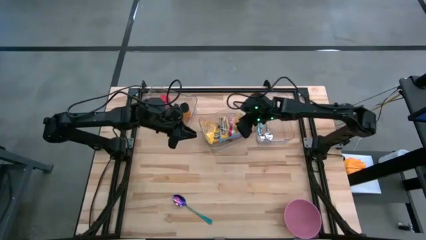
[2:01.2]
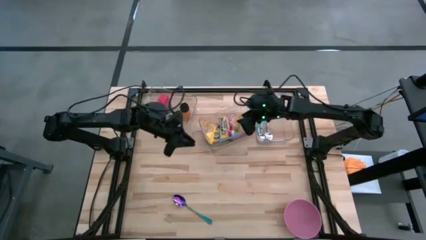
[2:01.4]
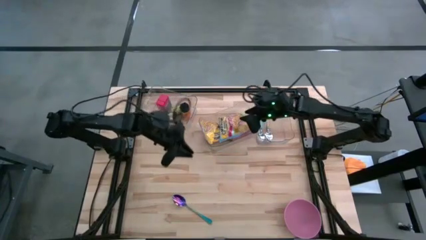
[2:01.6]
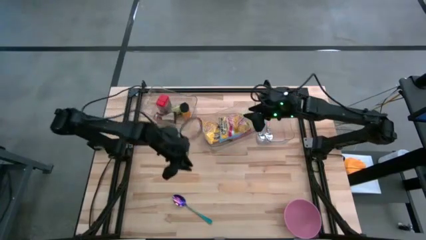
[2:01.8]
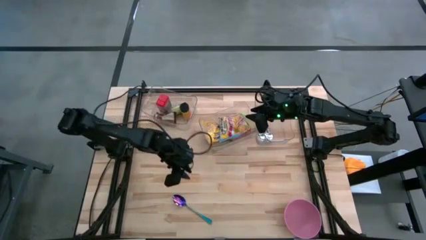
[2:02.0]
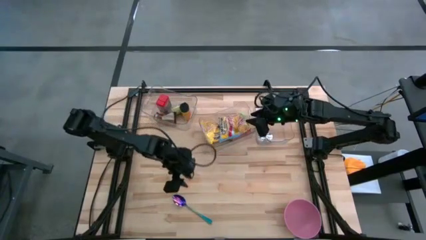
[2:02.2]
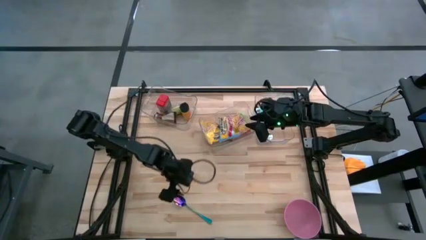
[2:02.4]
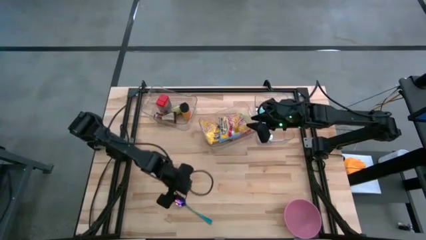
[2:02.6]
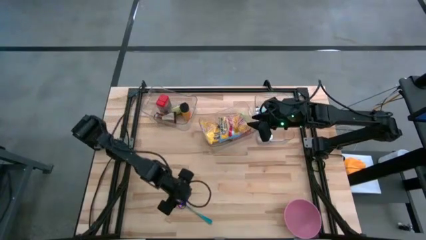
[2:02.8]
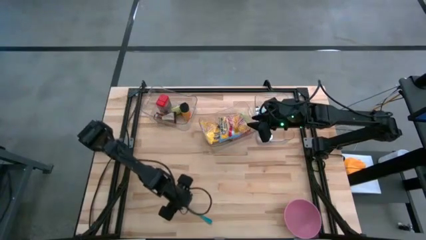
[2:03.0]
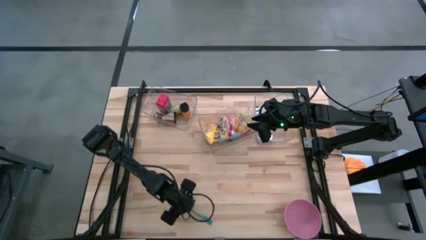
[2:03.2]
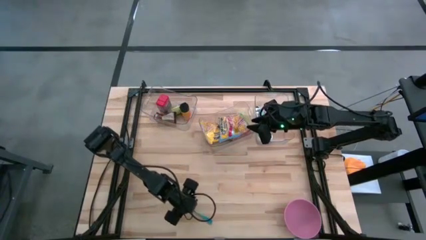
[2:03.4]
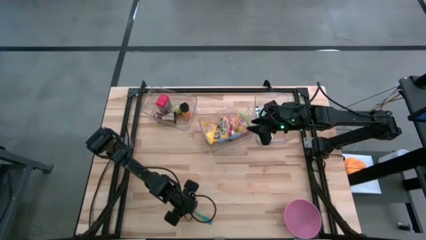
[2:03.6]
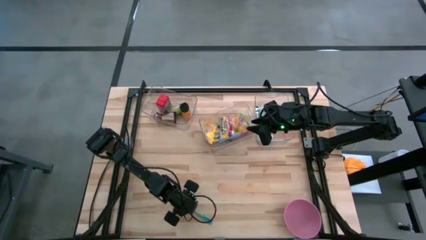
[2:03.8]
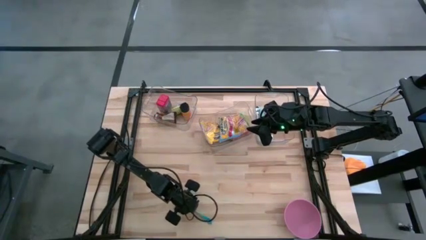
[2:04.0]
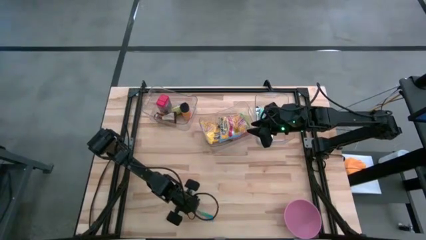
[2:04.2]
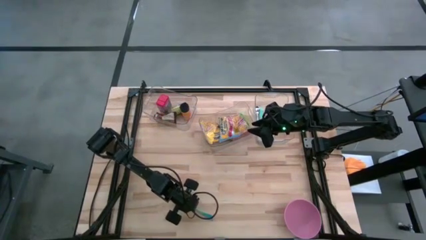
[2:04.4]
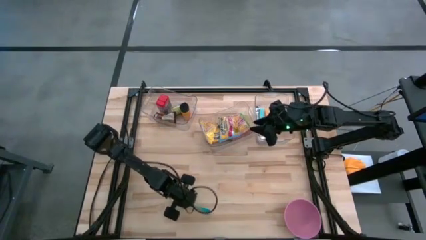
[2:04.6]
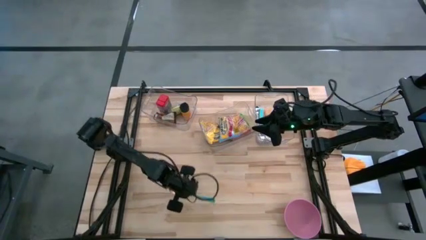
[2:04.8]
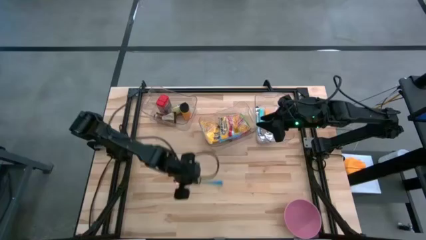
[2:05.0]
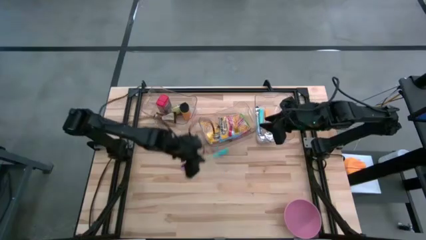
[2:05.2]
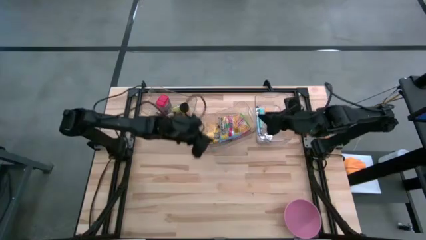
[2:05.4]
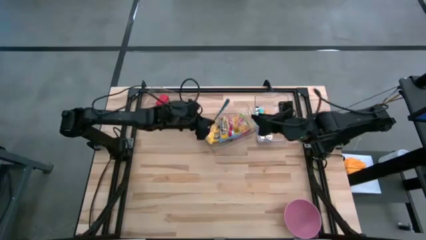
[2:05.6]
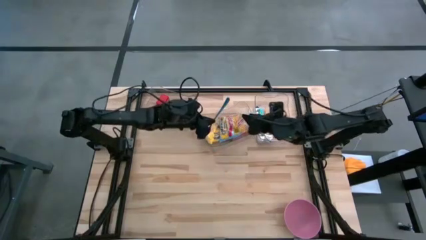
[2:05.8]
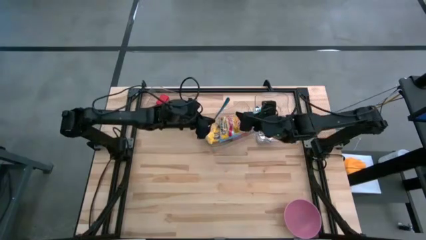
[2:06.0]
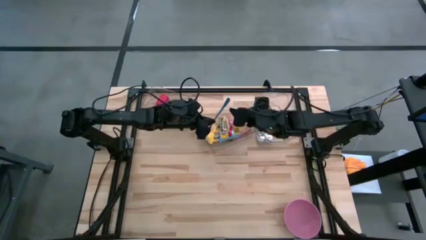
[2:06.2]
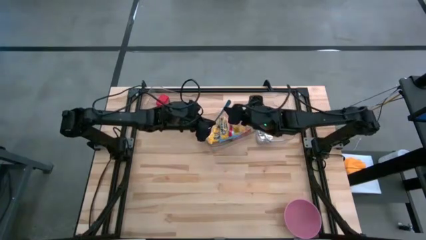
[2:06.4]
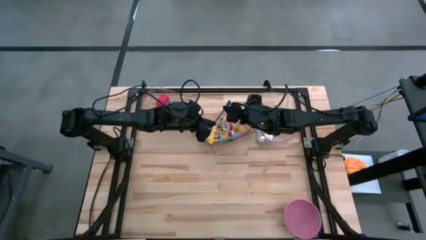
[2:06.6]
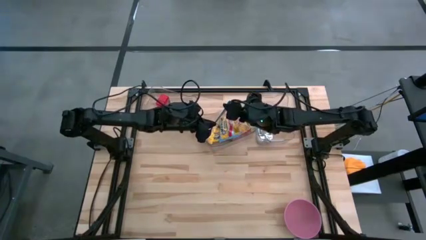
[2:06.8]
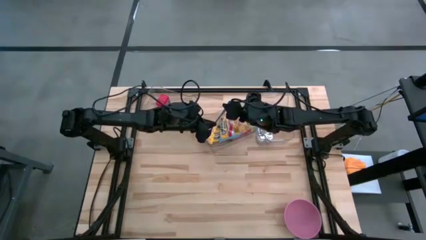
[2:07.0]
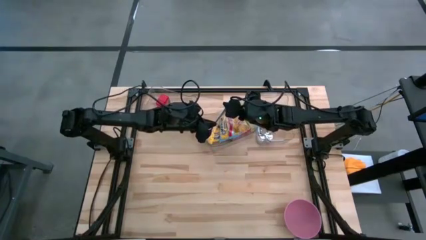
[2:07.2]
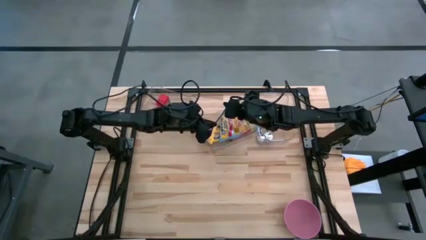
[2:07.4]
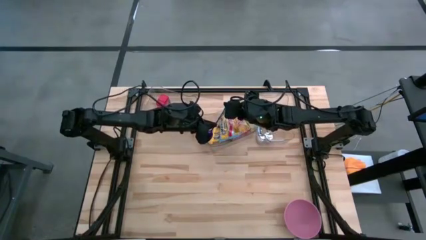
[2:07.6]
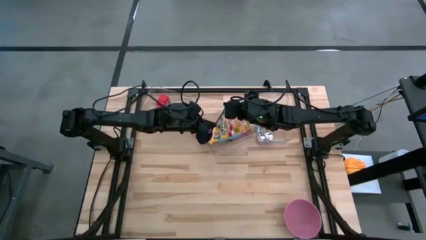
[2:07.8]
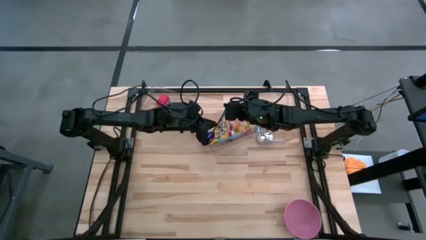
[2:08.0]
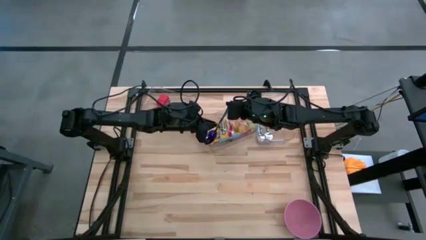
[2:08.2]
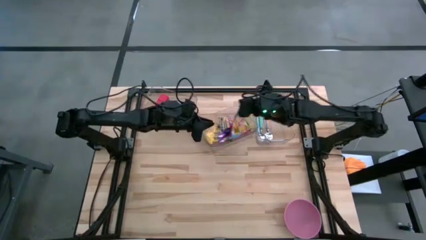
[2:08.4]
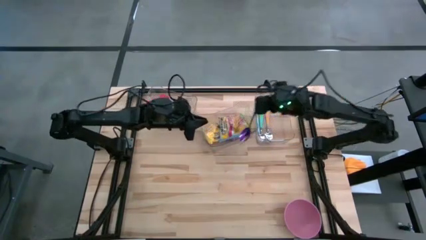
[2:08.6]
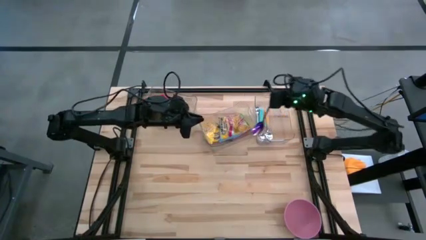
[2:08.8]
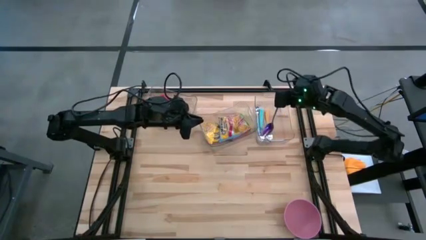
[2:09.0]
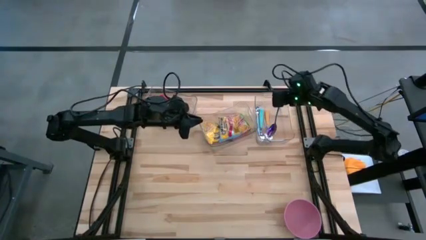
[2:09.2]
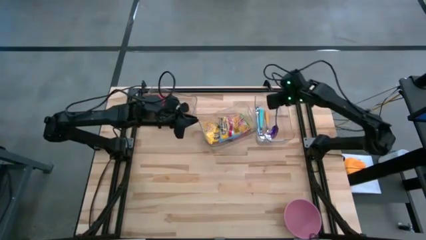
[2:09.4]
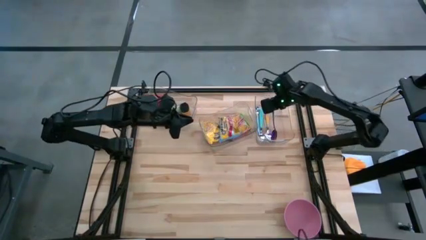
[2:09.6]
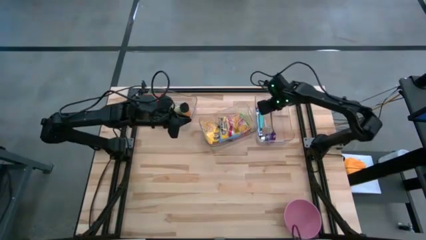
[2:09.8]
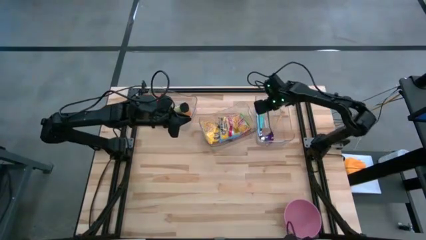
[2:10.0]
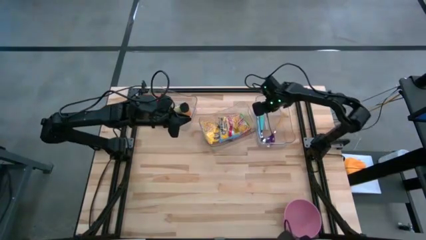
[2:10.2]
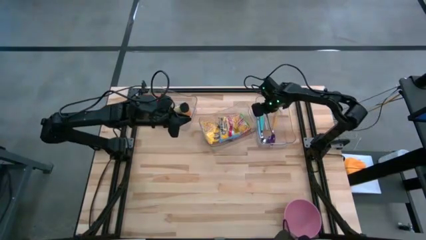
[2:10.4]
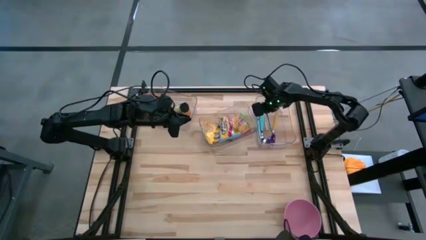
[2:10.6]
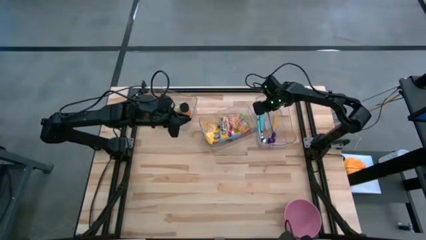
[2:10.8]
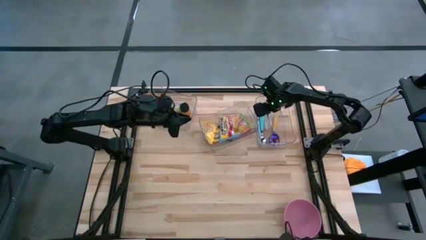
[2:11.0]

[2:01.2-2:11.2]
Task: Pick & Place Food Item
Put the blue spoon into the right transparent bin

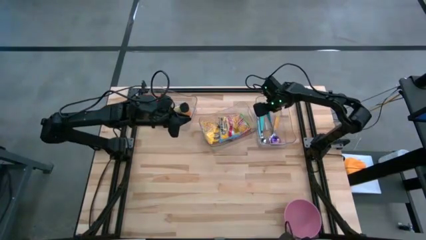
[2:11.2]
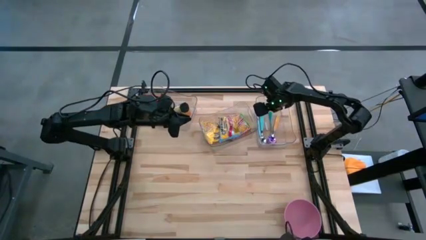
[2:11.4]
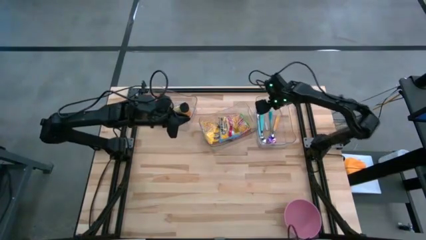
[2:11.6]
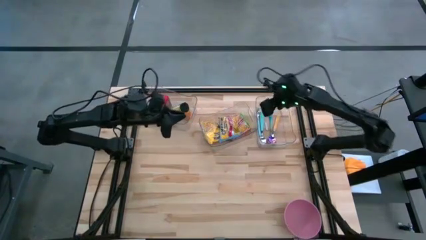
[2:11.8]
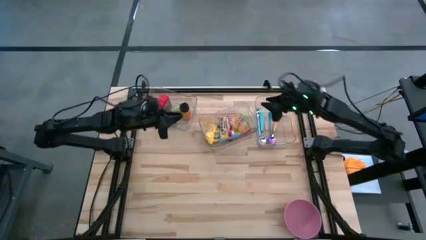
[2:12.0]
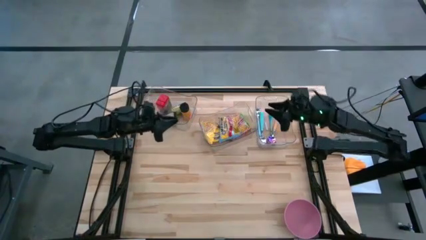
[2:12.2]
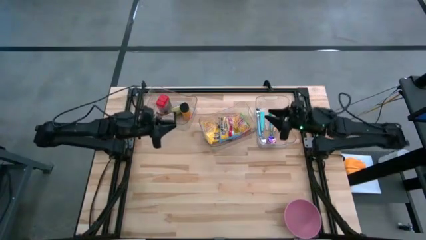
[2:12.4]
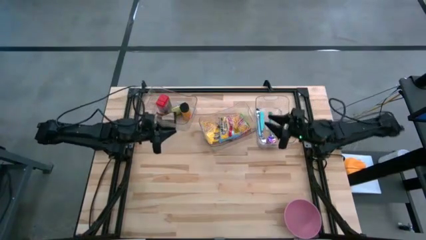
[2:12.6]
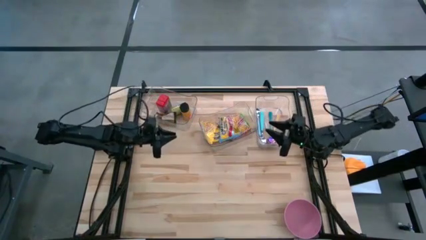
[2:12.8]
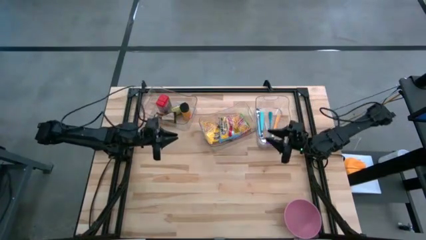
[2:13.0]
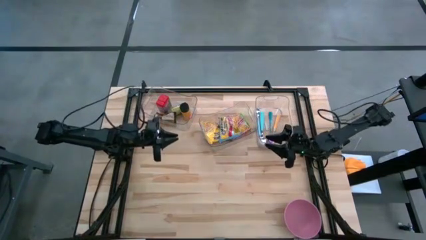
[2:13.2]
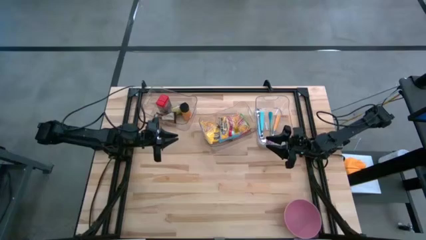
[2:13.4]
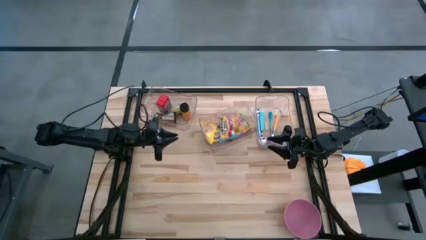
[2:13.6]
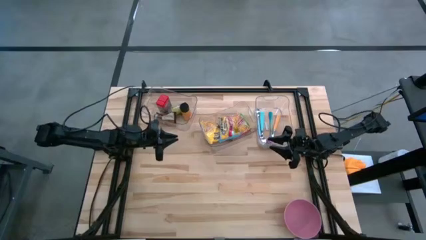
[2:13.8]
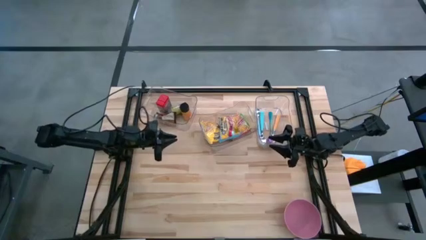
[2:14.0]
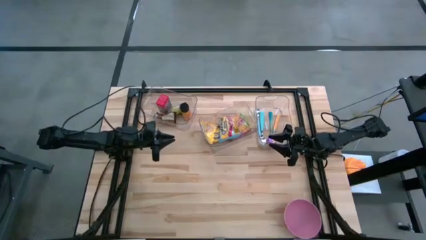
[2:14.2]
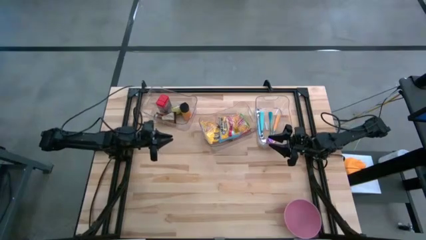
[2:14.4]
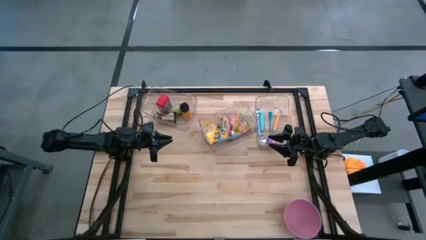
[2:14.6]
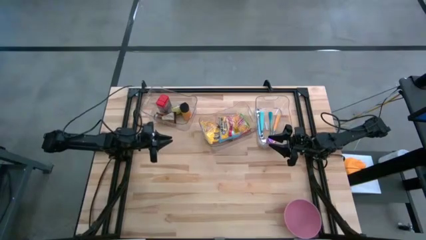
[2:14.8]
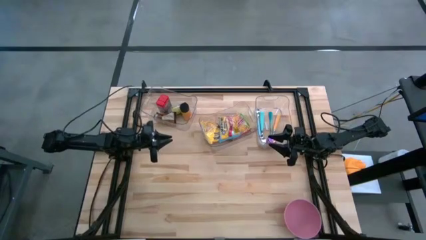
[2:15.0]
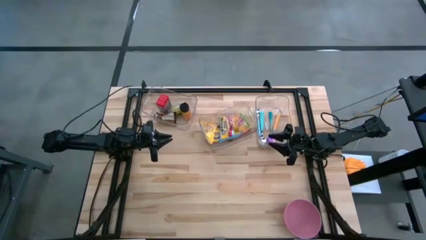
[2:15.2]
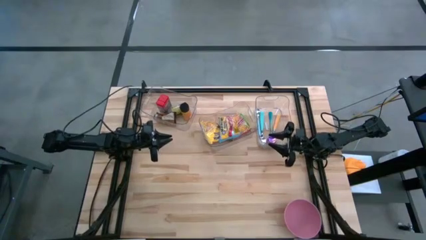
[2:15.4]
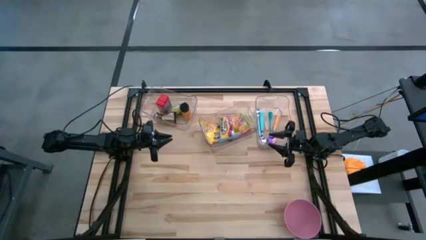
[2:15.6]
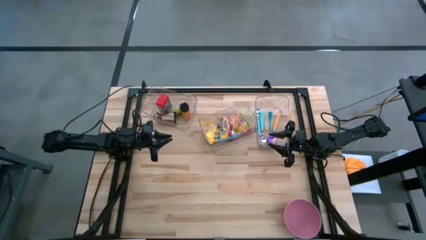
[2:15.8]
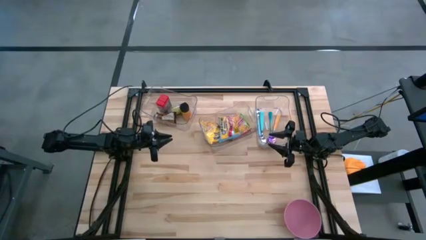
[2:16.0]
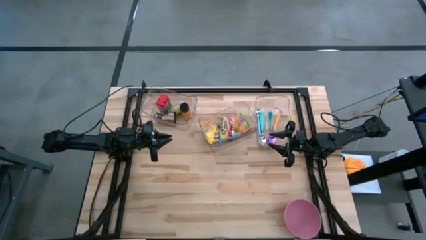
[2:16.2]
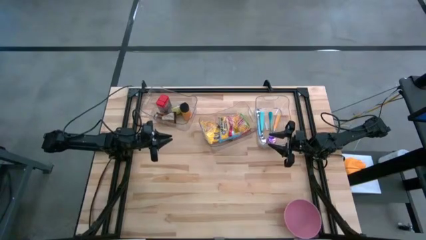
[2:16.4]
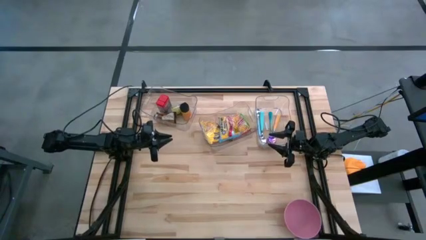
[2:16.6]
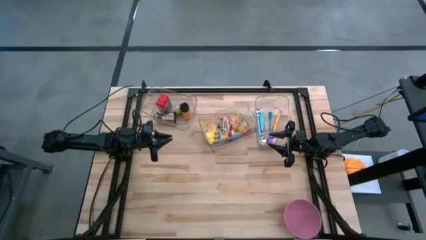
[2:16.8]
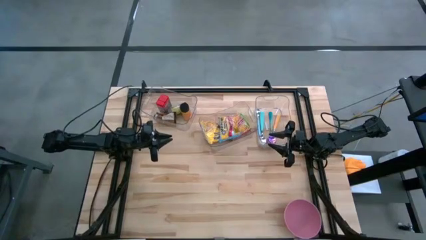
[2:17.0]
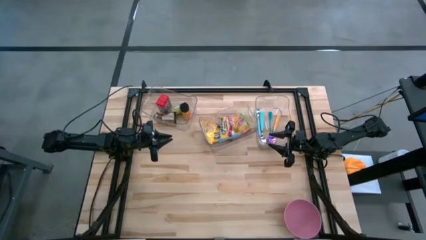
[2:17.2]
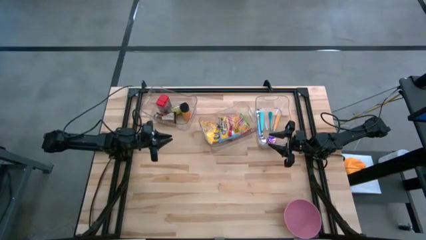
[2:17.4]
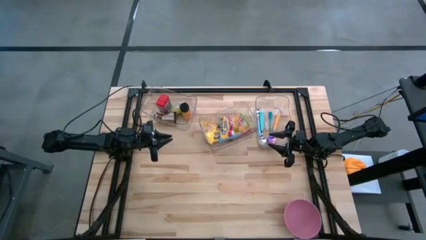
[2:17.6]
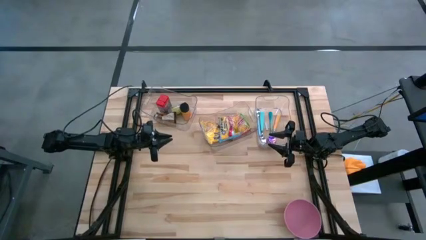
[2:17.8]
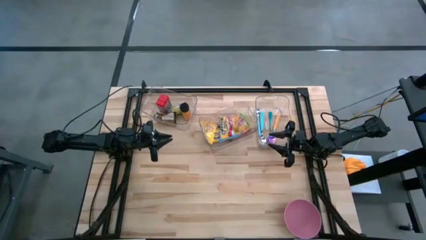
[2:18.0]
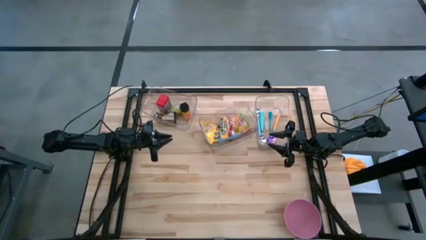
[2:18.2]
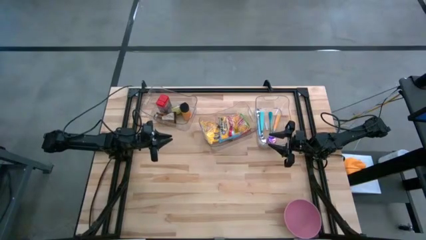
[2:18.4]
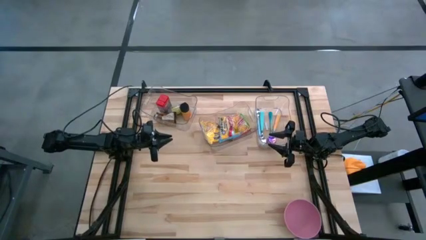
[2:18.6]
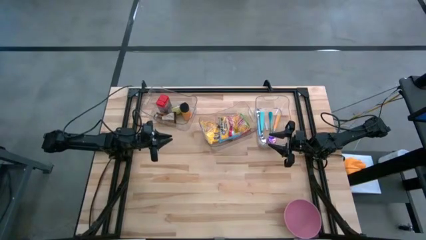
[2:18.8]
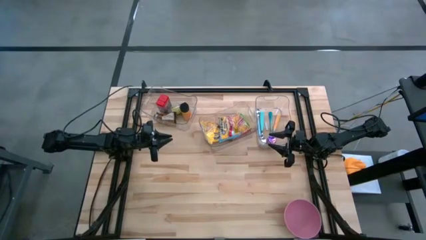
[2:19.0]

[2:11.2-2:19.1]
Return to Home Position
